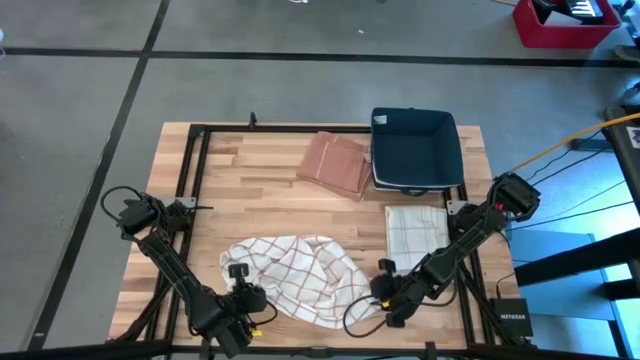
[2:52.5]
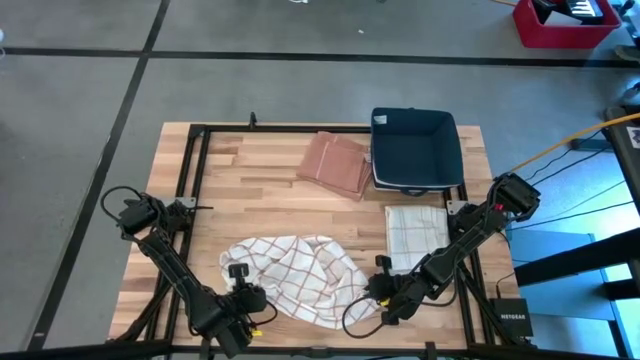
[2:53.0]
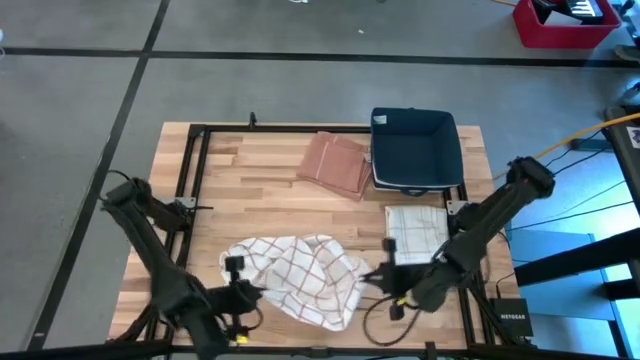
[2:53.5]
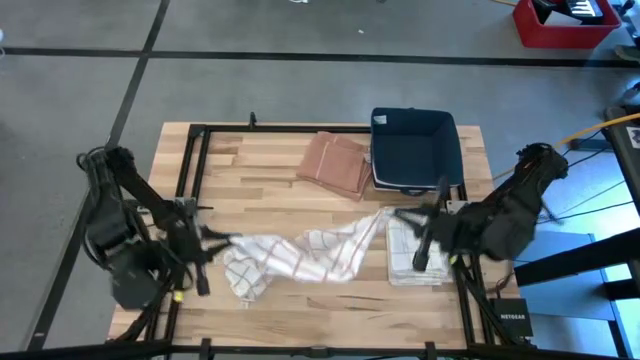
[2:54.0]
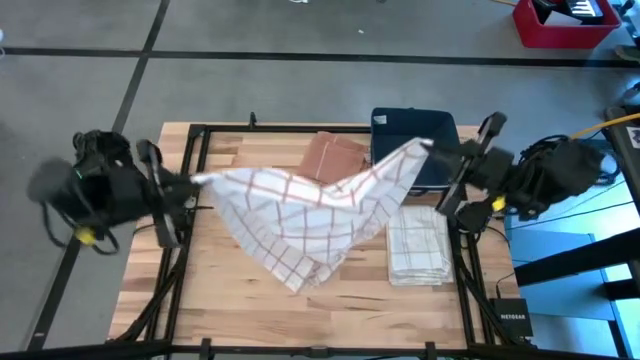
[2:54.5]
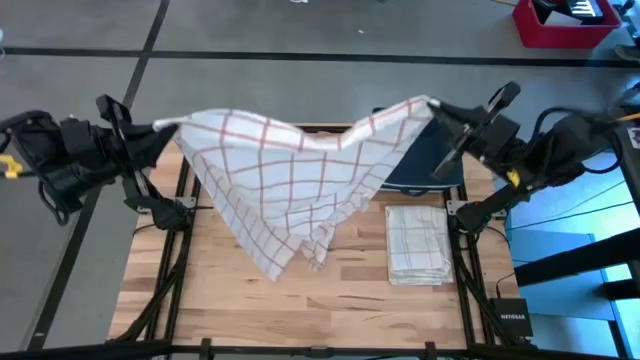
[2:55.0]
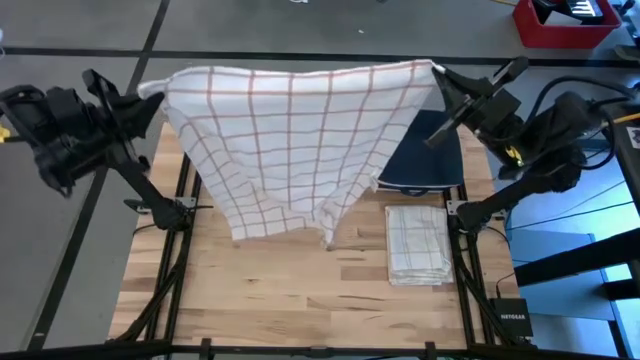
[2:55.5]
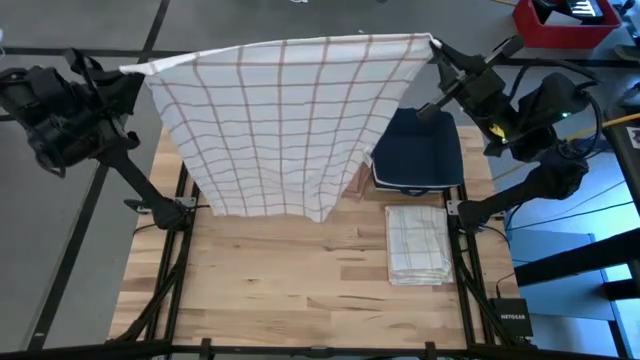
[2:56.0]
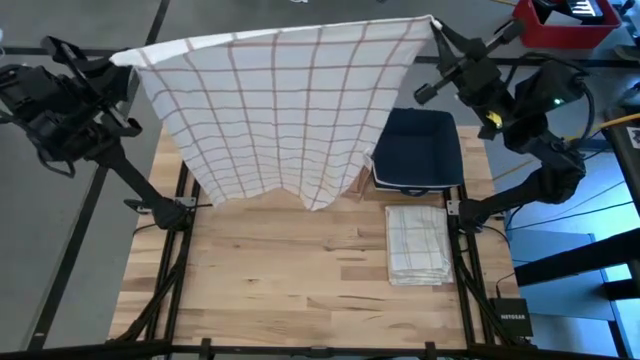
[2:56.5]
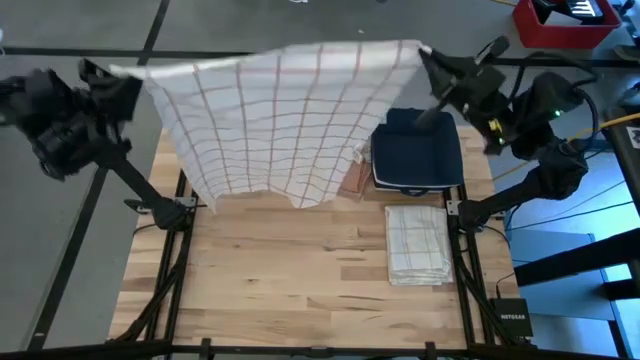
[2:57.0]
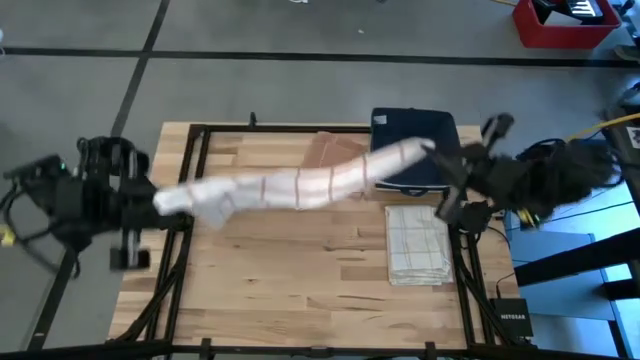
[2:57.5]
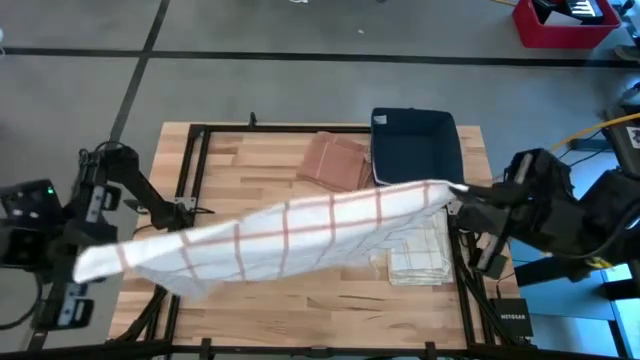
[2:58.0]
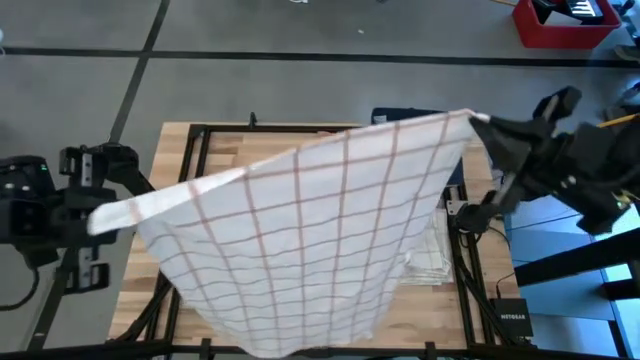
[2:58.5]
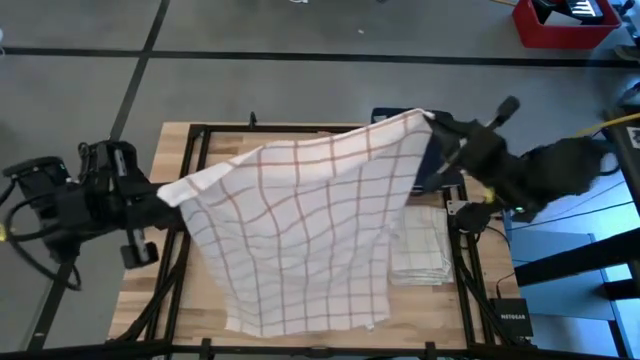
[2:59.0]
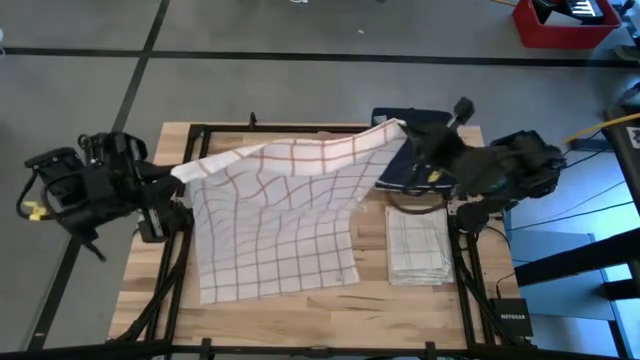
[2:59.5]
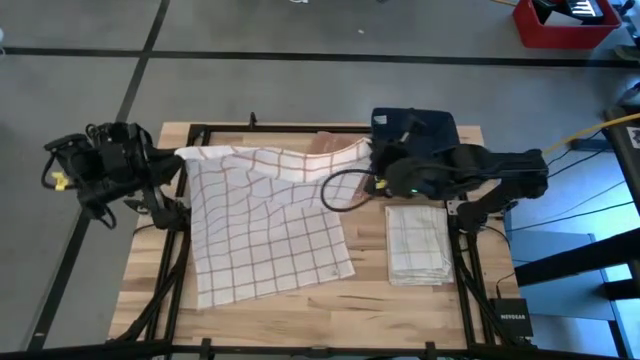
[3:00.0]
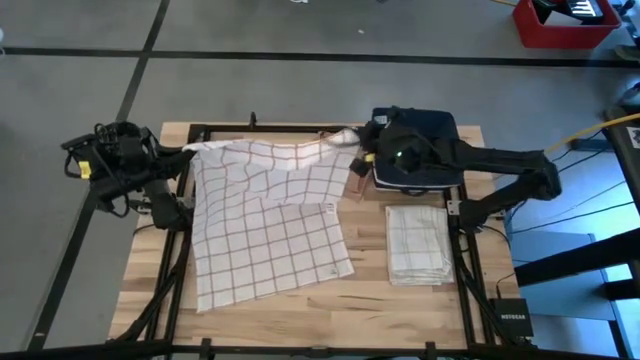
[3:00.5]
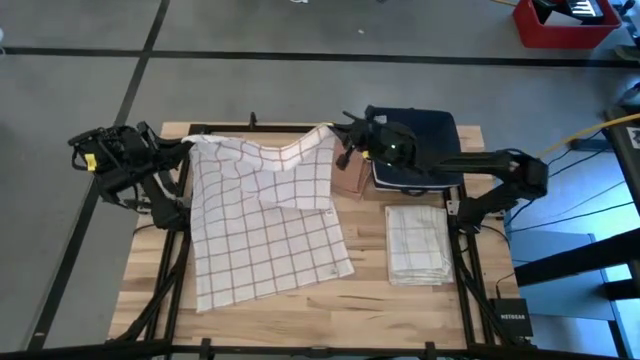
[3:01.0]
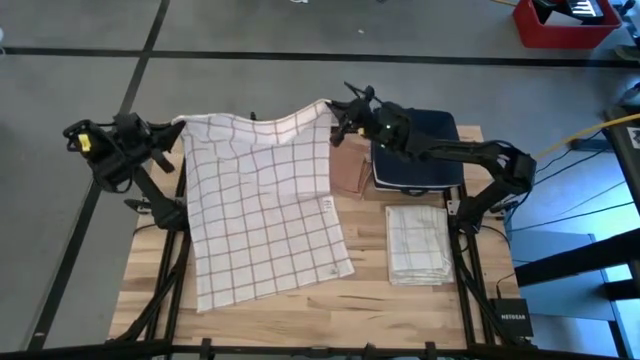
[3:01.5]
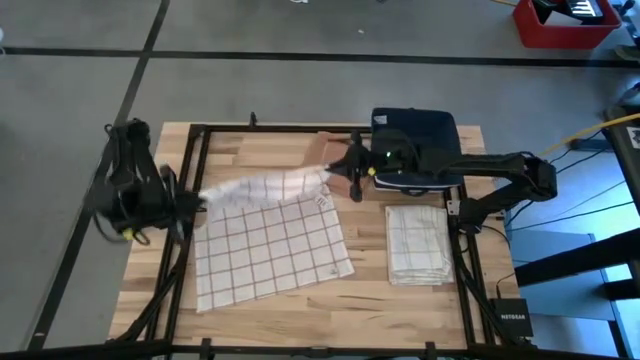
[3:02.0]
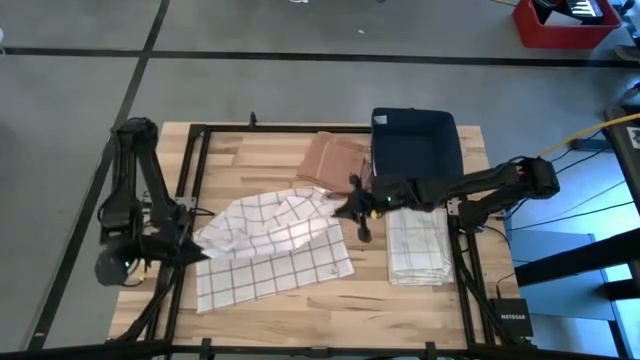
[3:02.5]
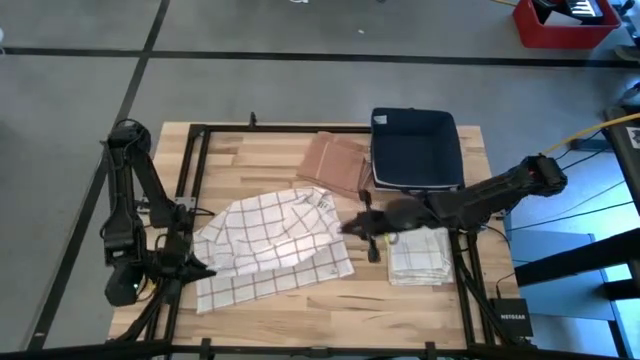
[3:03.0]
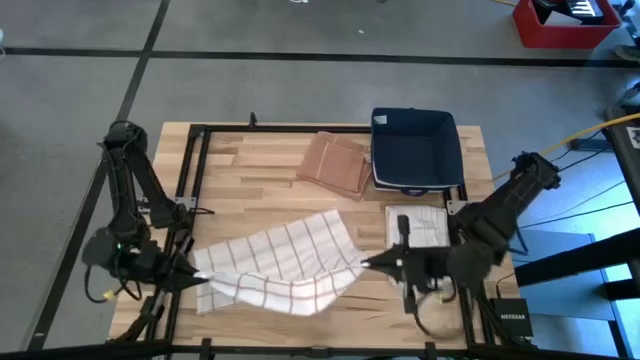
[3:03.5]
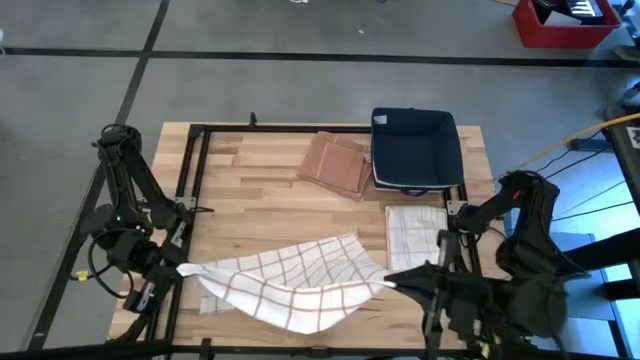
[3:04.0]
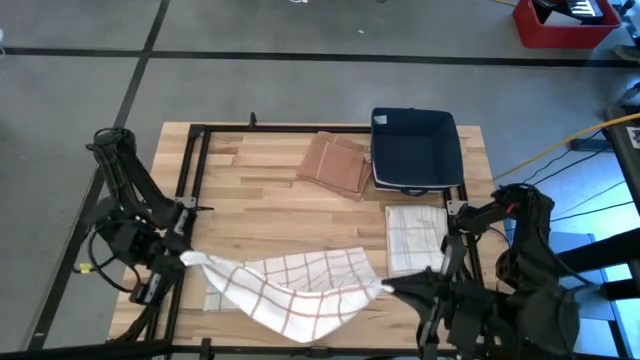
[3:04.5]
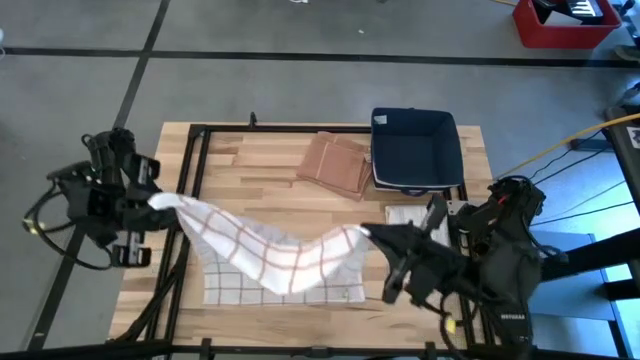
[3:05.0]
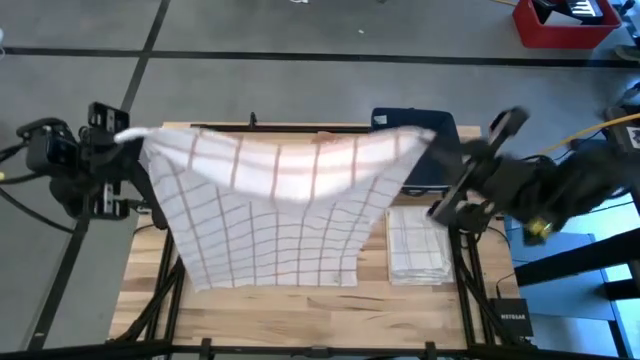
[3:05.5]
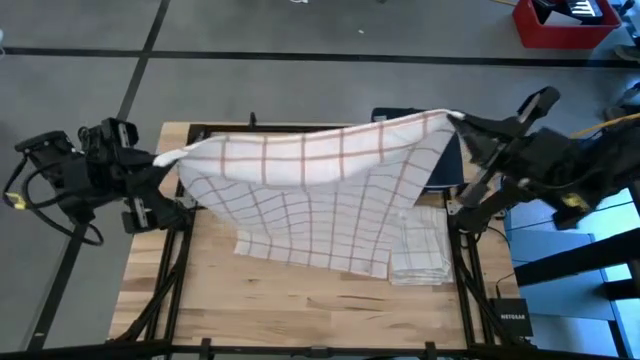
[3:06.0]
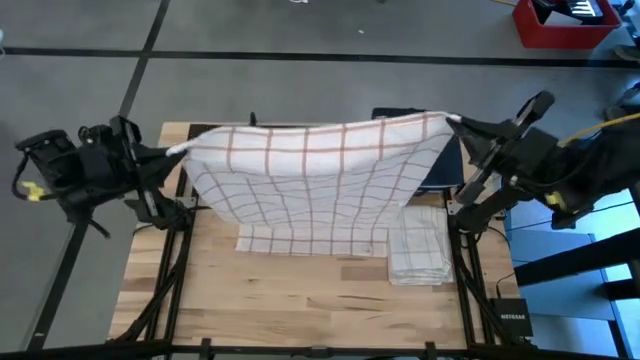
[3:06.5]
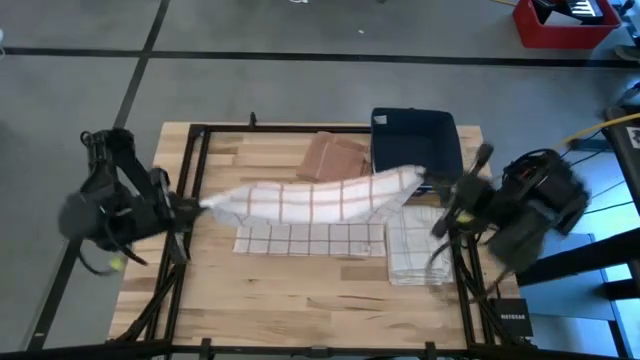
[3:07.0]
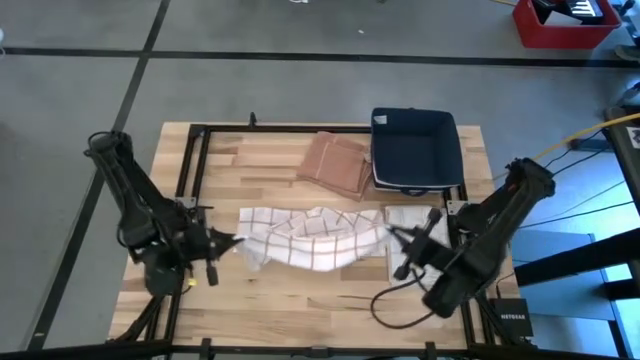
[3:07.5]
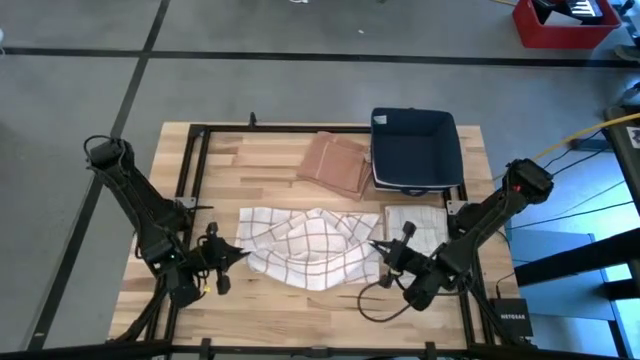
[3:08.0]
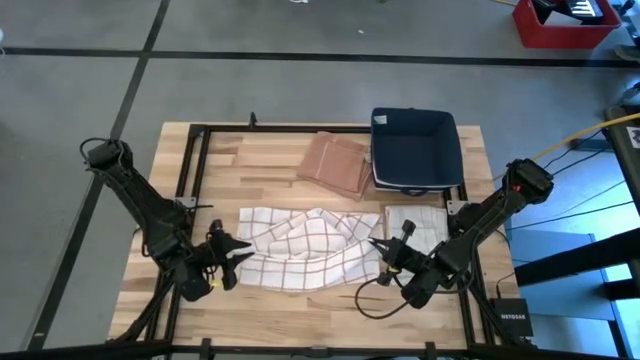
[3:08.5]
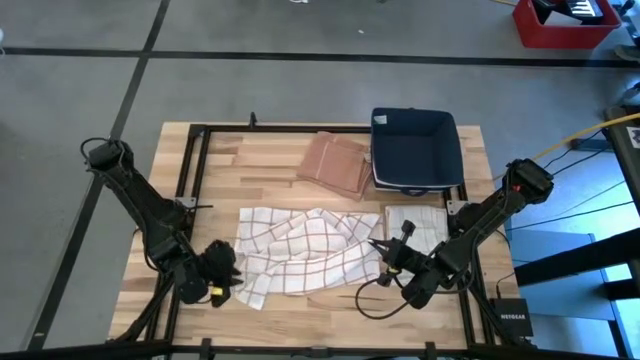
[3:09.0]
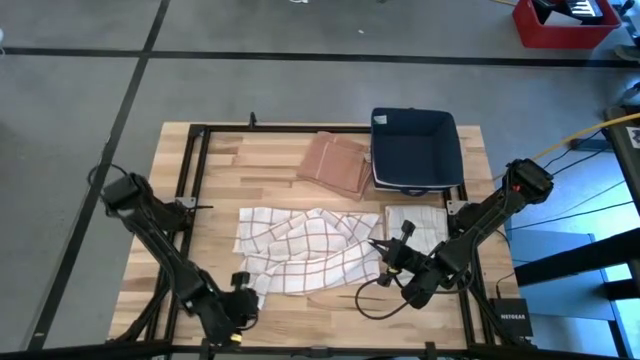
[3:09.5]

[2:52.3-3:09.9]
Task: Fold towel
Fold the white towel

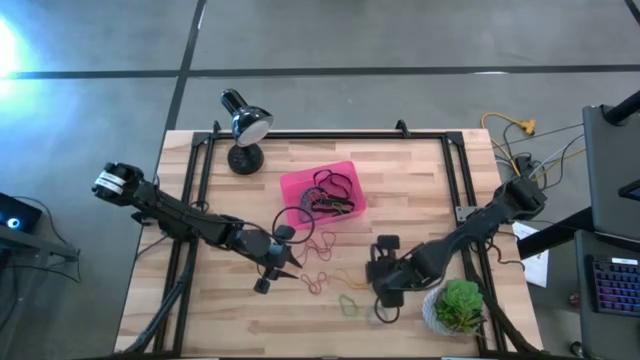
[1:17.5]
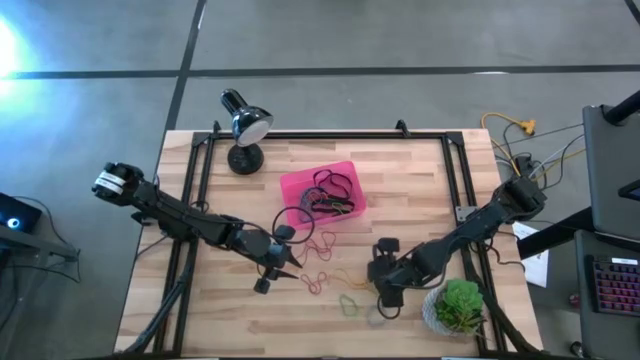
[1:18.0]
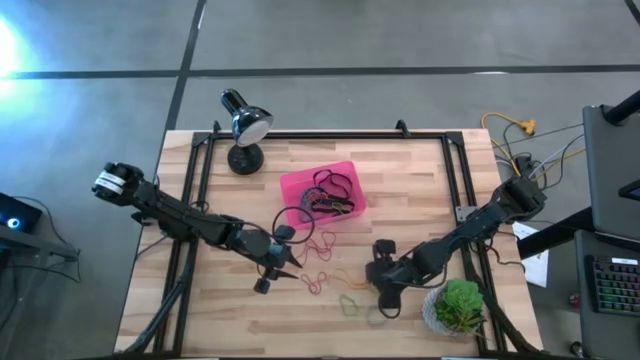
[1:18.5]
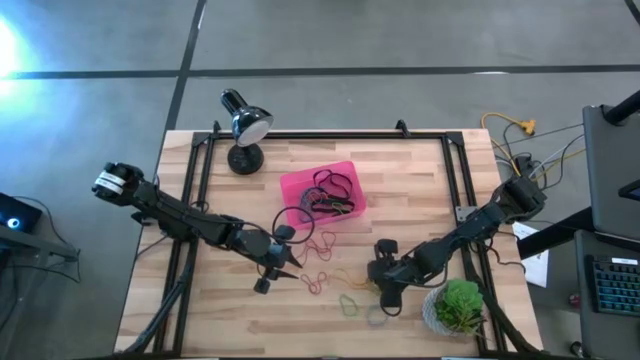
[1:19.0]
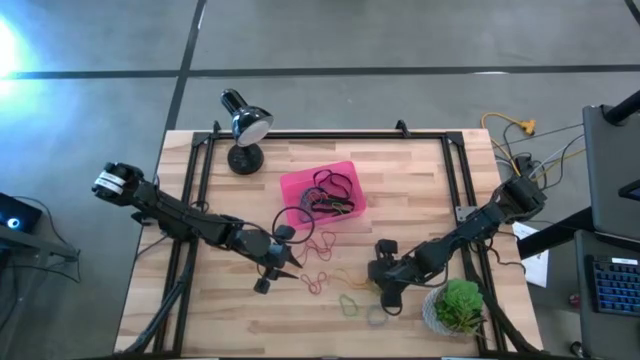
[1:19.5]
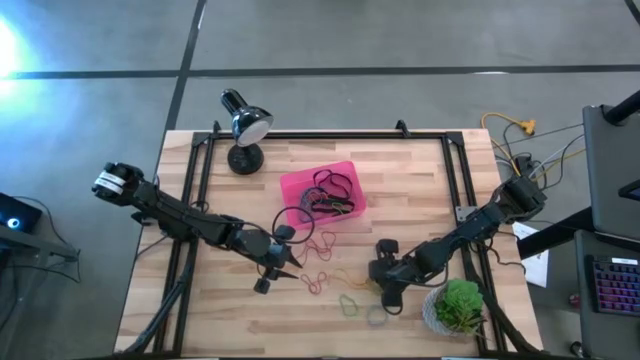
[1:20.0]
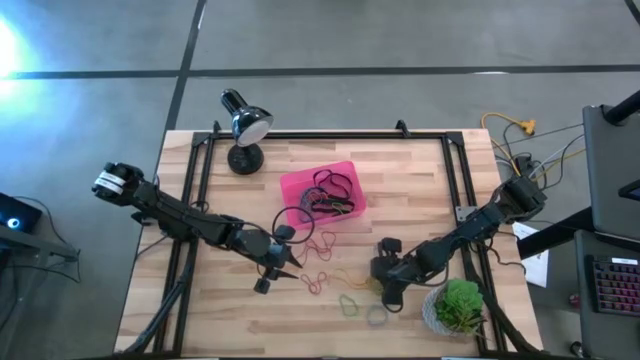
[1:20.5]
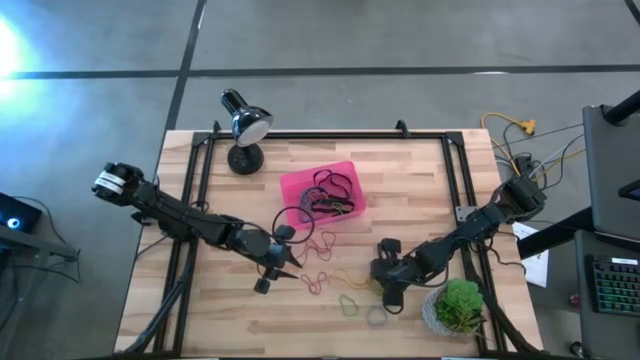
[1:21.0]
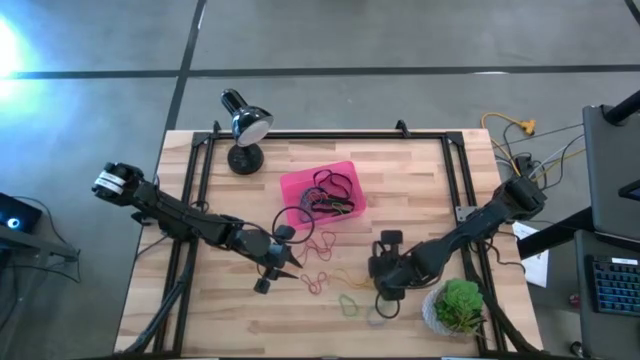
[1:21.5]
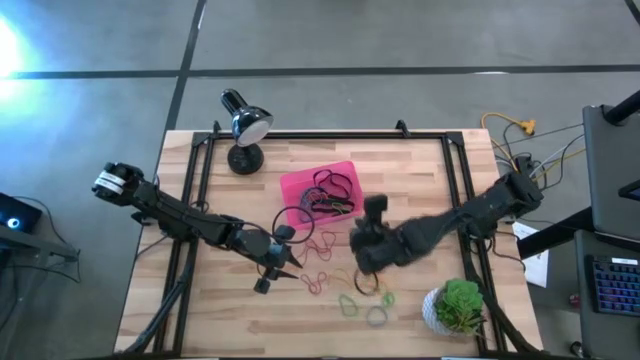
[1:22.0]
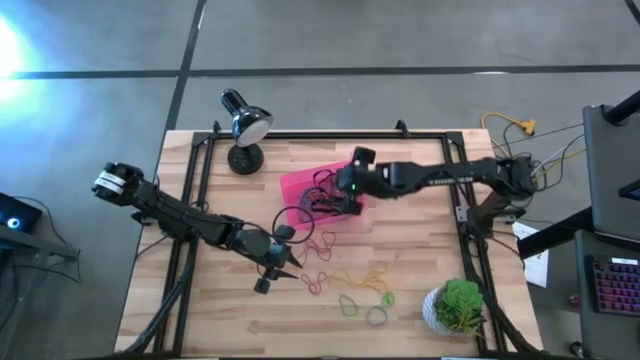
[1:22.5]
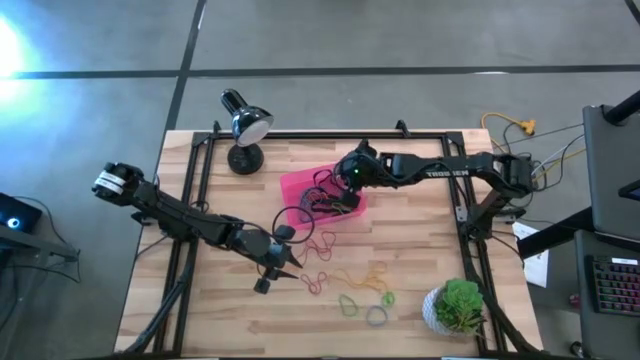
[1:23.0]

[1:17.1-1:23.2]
Task: Pick and place rubber bands into bin
Put the green rubber band into the red bin
